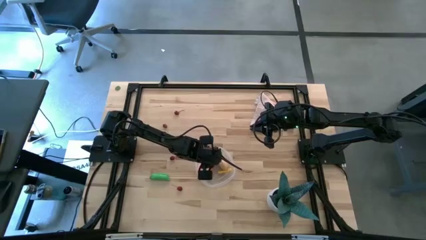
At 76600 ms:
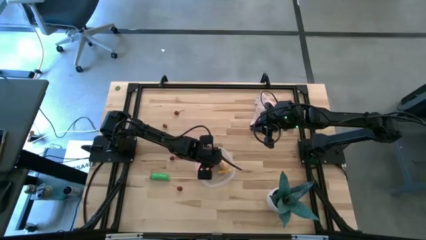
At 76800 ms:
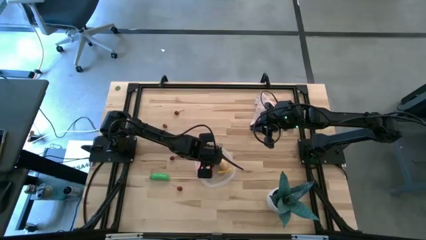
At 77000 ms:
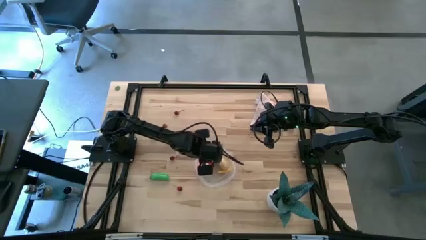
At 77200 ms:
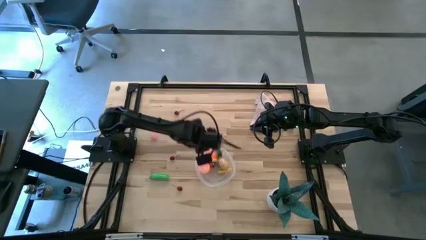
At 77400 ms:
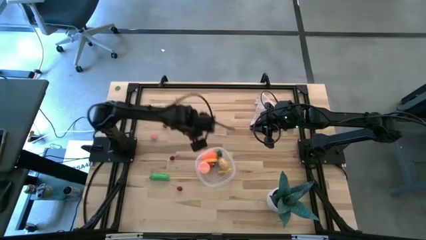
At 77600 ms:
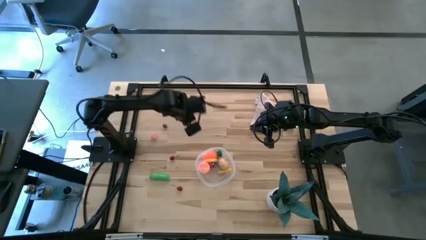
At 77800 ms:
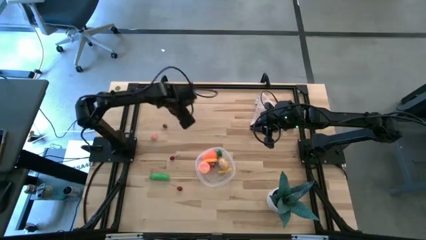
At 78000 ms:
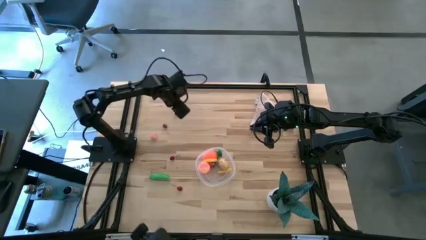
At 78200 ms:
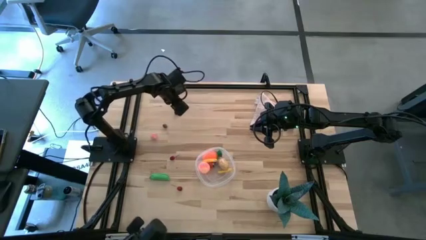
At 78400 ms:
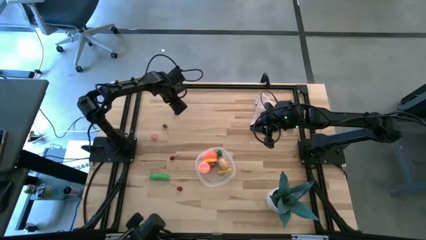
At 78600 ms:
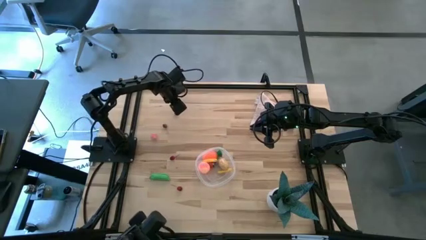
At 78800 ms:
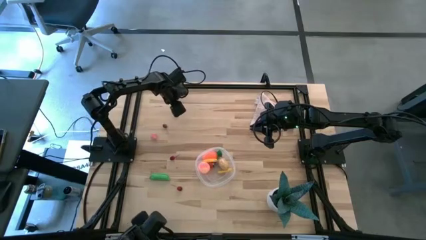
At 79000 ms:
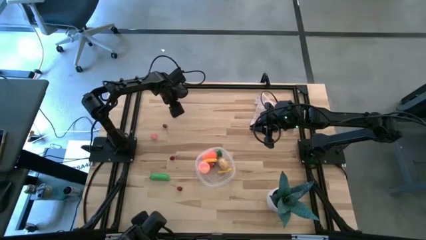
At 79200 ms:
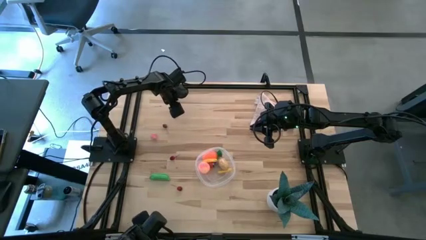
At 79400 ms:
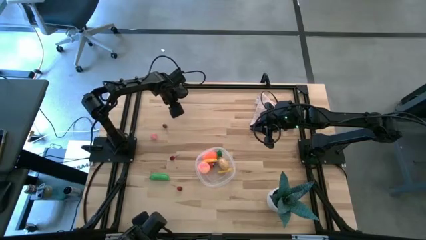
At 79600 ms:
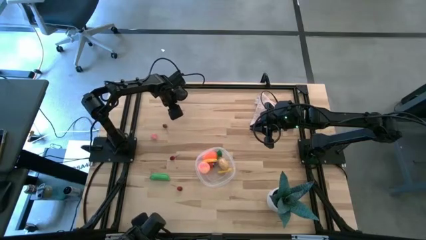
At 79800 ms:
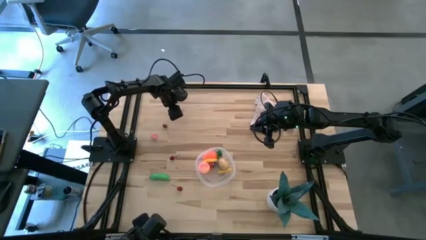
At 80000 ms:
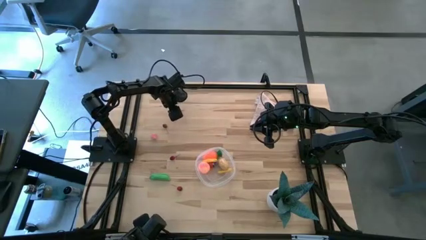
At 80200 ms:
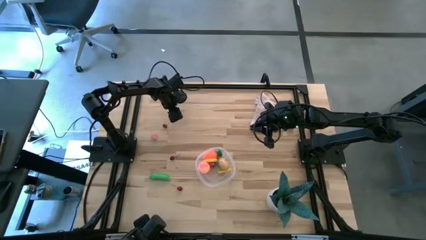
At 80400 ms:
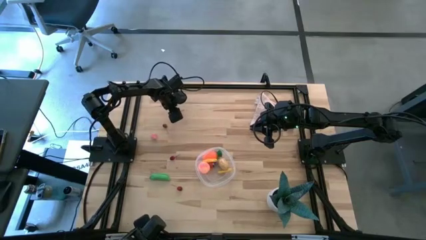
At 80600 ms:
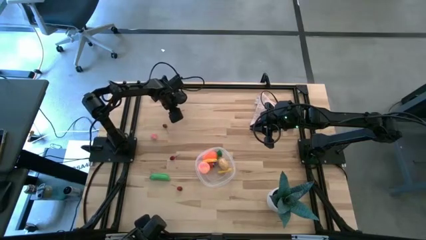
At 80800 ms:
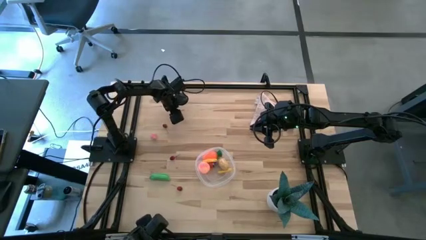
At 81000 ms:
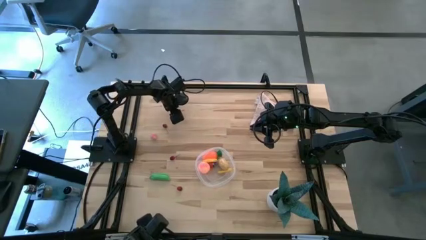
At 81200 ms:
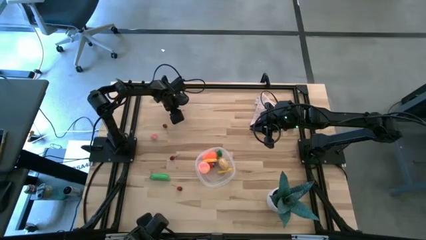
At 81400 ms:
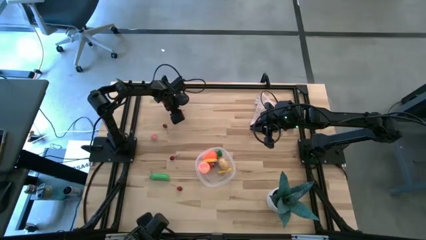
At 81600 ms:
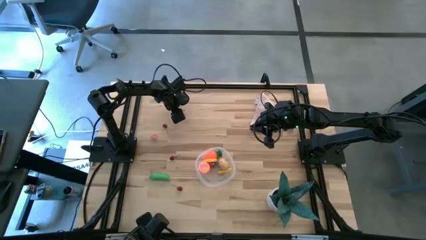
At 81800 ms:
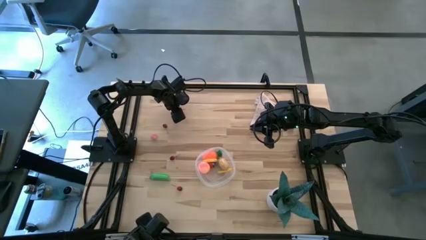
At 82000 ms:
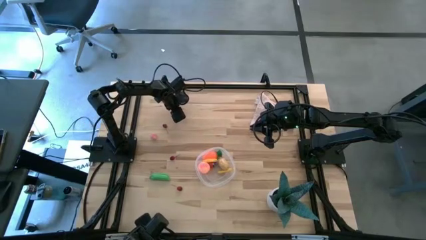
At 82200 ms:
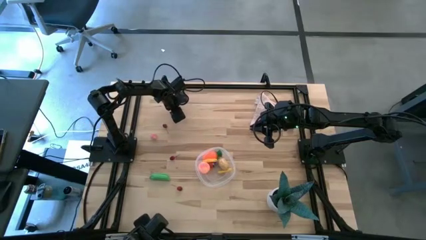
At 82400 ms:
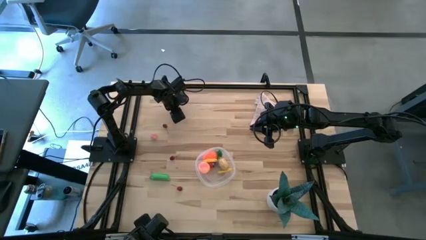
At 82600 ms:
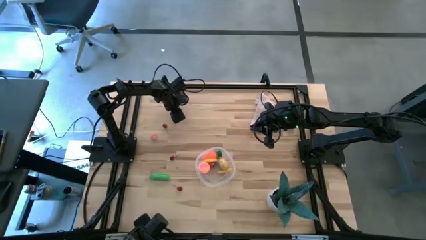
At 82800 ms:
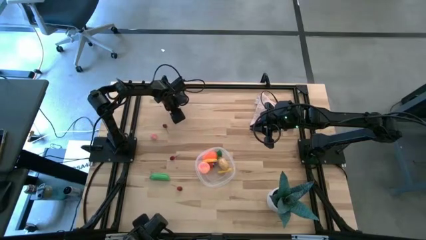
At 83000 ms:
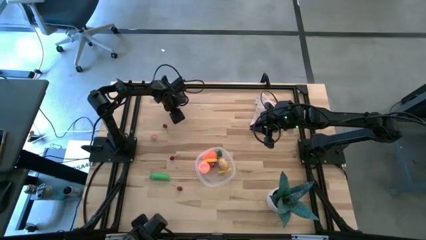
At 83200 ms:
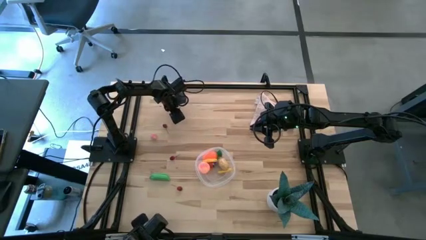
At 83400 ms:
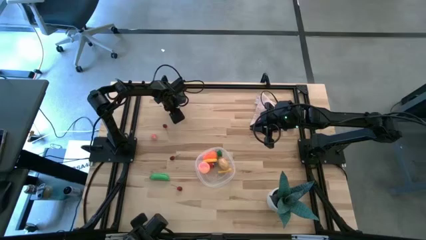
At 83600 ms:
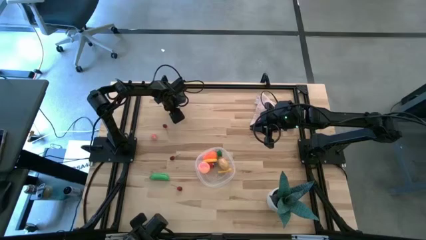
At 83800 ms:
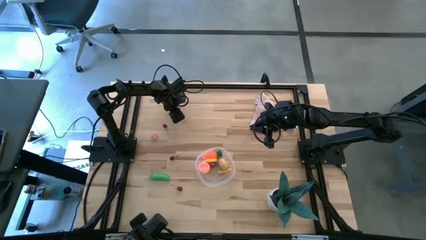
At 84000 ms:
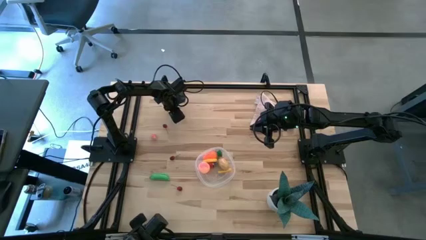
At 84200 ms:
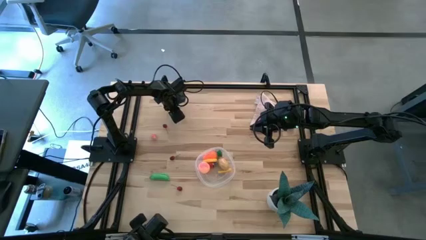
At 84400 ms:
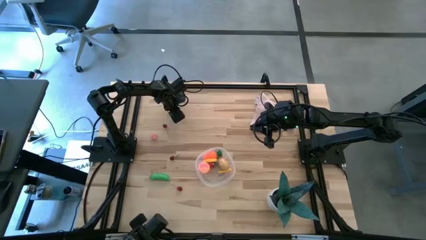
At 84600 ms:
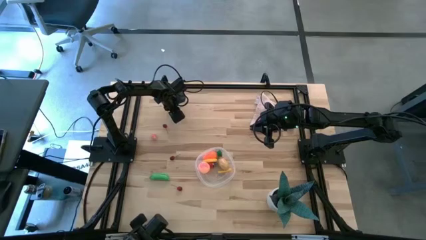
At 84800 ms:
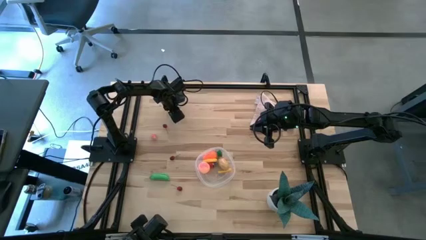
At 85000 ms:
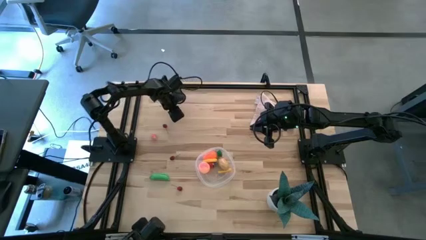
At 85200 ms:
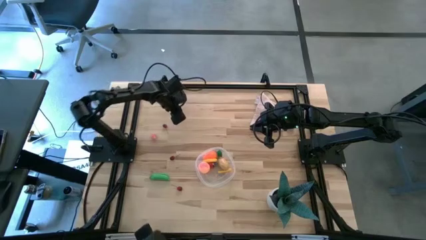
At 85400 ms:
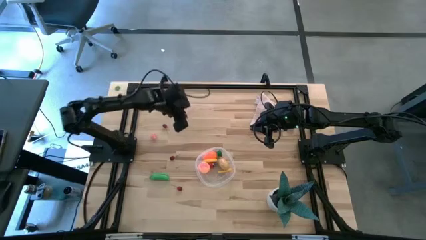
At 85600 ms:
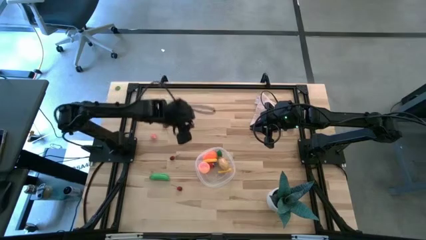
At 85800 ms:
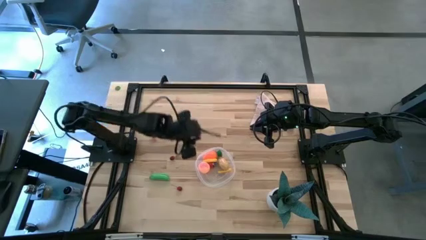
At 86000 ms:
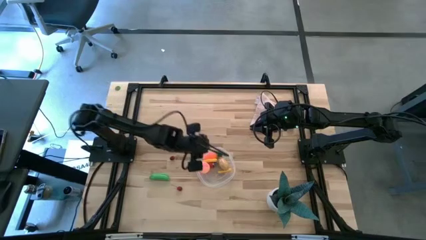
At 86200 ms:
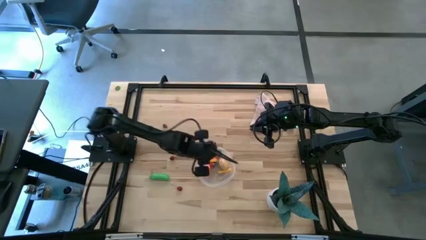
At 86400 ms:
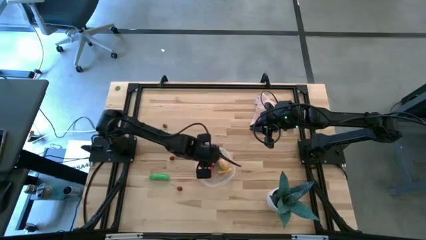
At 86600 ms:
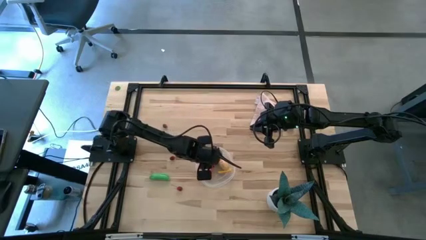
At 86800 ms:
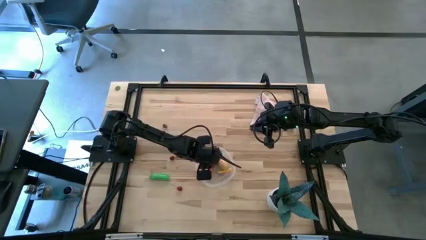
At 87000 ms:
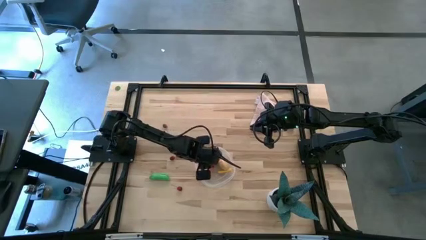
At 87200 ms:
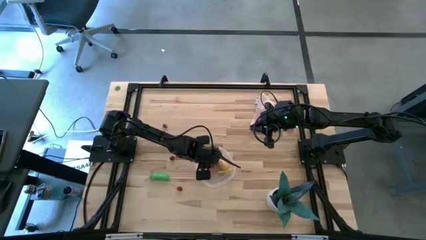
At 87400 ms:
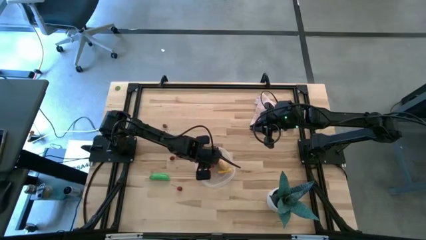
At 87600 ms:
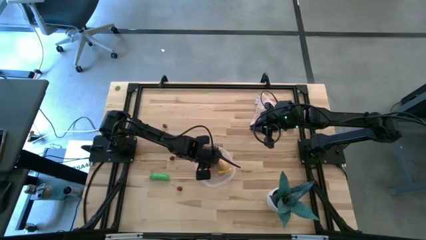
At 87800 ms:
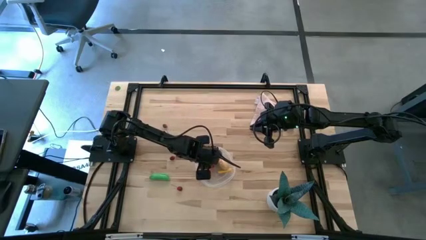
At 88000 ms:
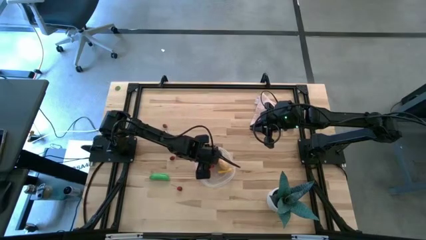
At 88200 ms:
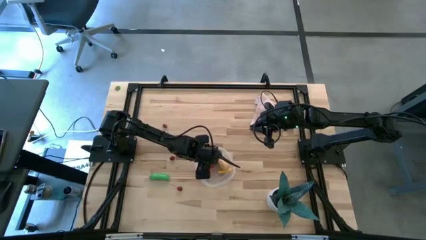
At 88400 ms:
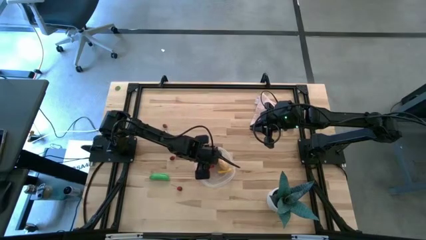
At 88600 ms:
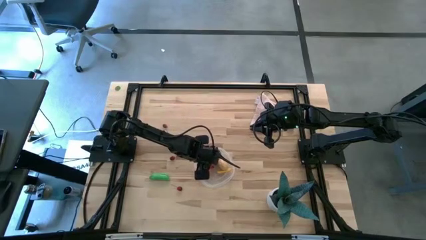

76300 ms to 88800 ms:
Task: Pick and placing Produce into tupperware
Put the cherry into the transparent bin
